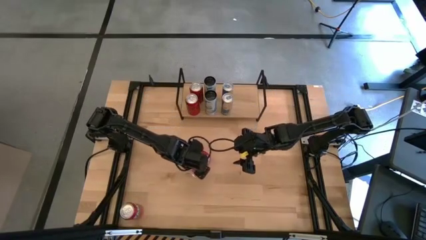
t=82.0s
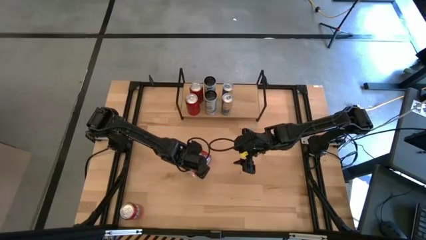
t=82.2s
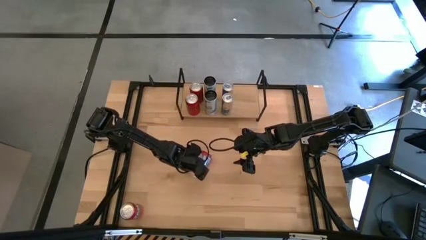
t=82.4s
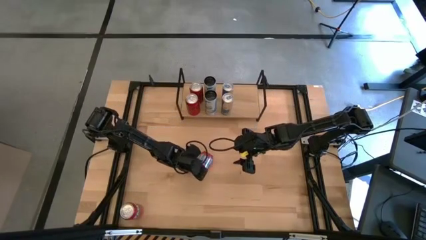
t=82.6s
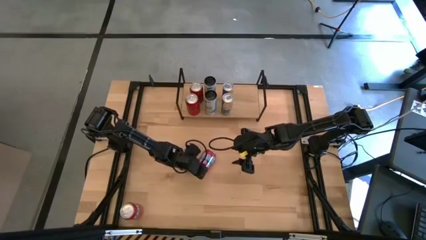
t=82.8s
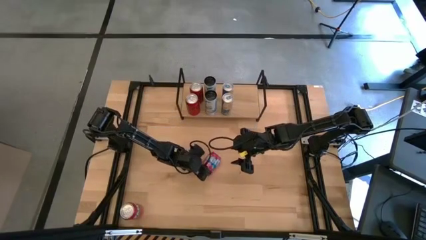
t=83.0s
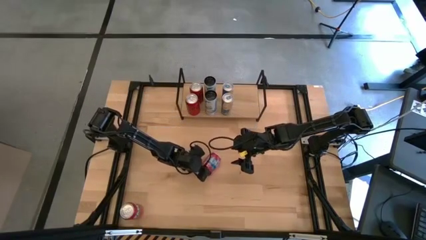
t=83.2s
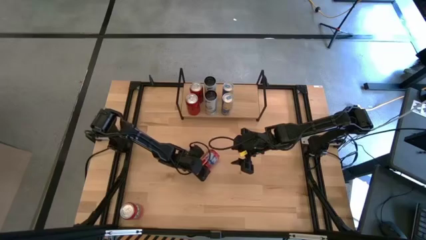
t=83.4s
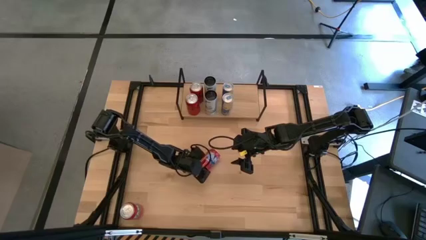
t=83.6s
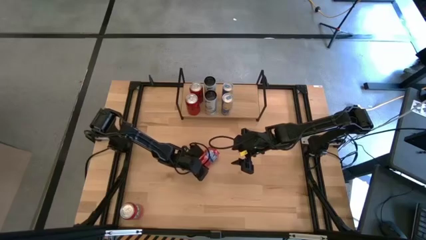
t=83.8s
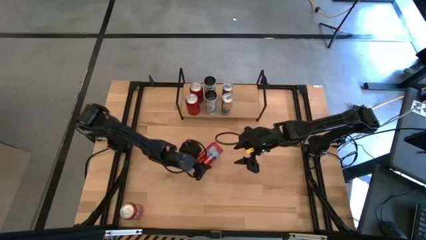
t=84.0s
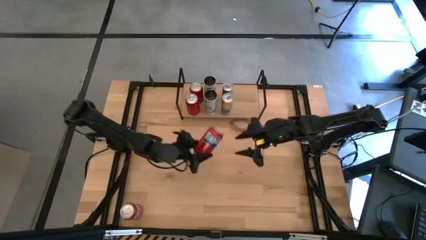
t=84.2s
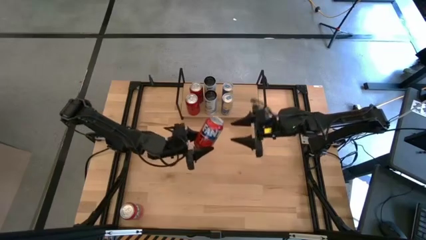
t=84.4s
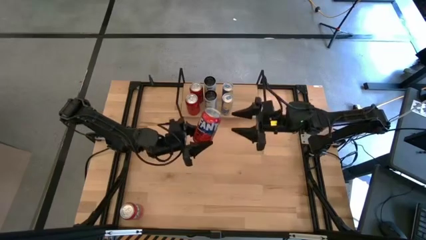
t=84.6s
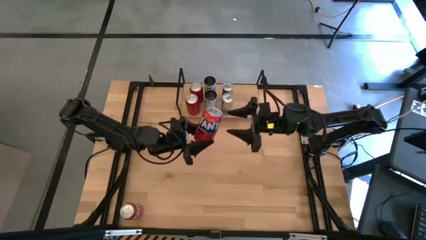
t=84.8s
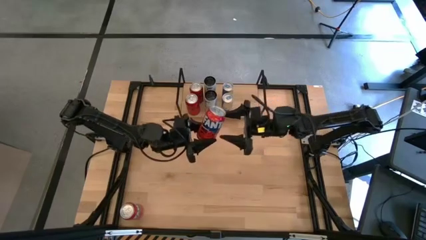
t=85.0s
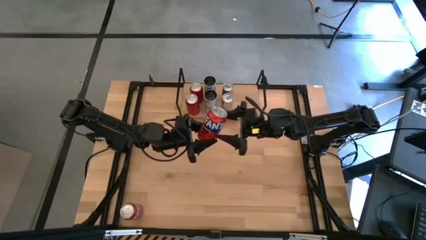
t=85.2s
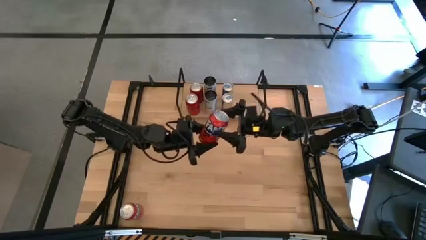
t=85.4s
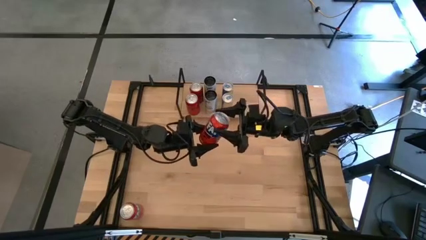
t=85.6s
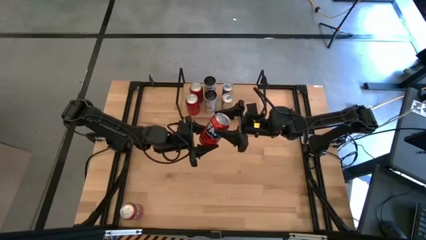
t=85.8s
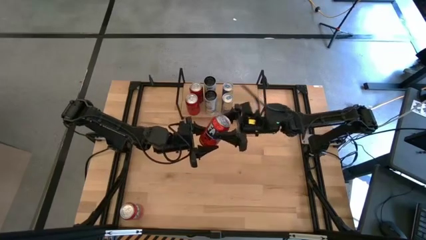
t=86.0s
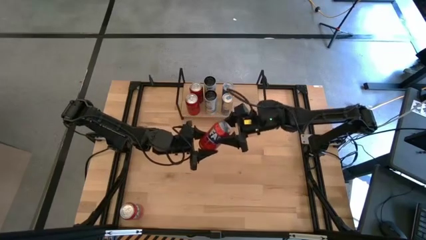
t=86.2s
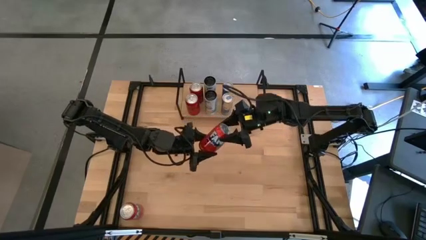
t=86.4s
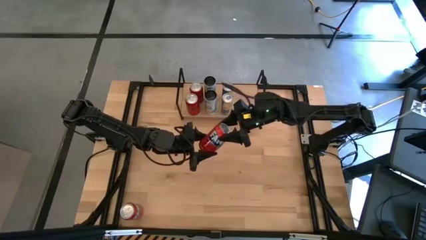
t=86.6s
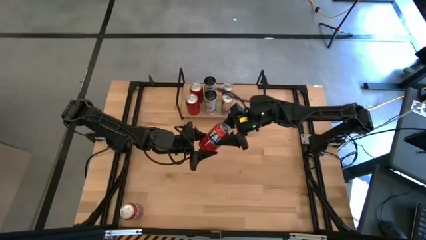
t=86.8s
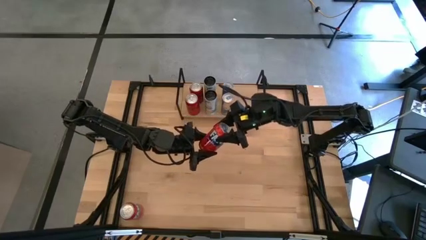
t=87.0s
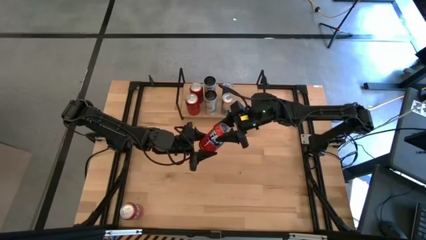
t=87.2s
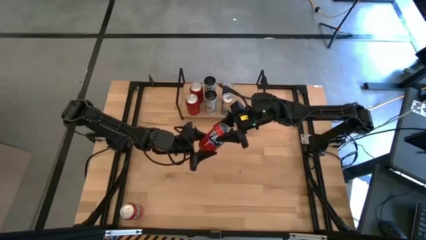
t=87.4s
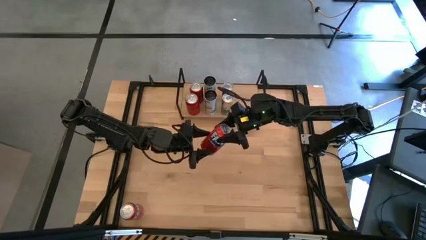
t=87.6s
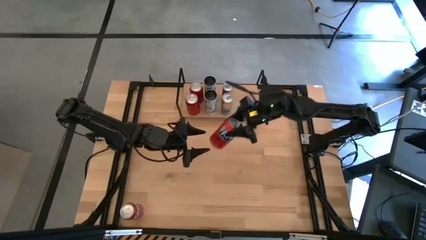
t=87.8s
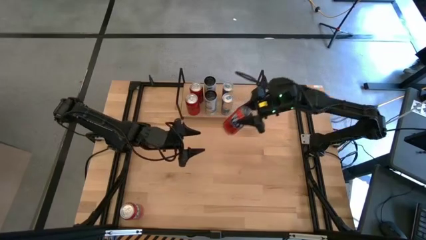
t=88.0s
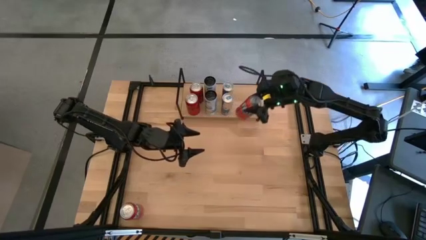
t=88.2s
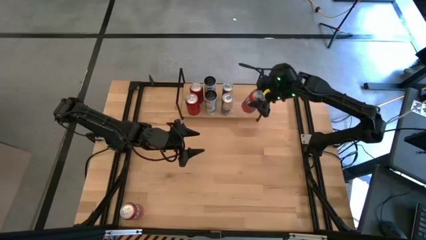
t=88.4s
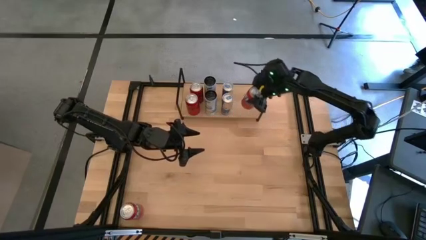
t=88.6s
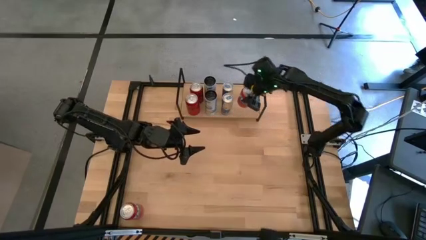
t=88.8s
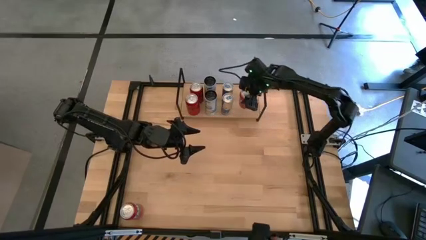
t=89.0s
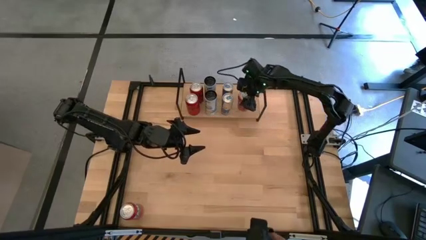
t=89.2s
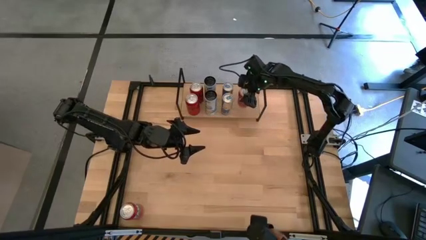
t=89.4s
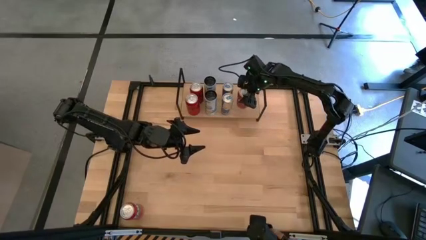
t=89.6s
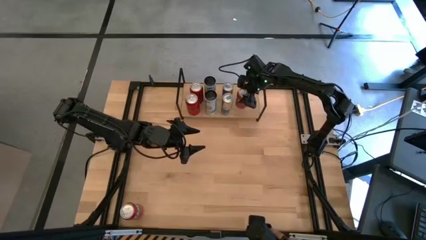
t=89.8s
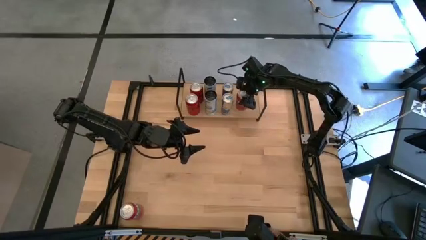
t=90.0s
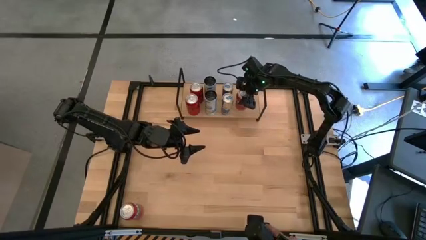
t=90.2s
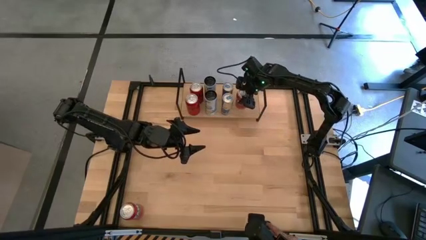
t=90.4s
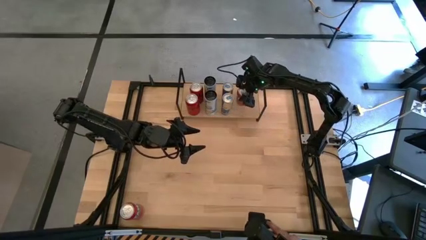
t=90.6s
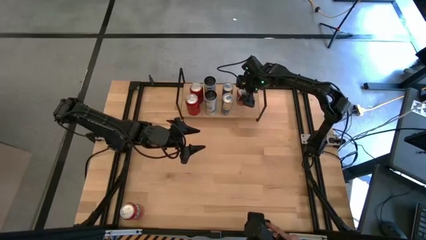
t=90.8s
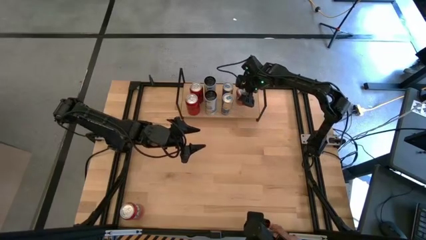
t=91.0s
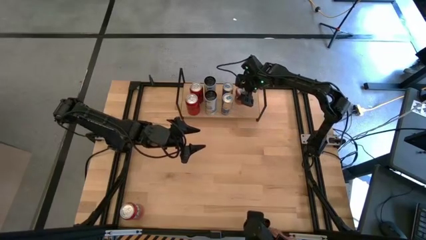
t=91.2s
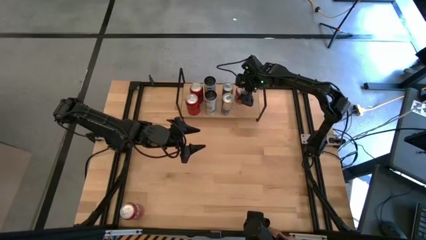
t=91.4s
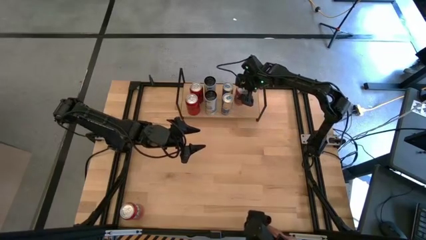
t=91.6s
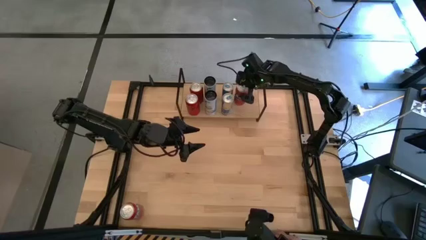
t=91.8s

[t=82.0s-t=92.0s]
Task: Place canned beverage on shelf
Put the top orange soda can on the shelf

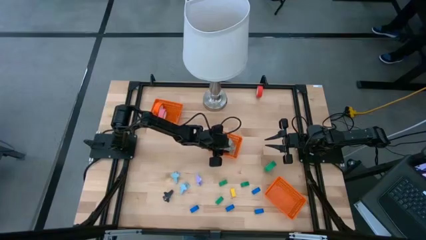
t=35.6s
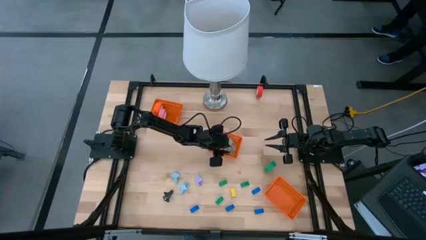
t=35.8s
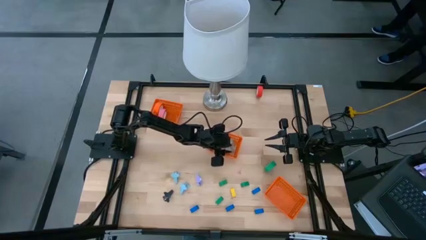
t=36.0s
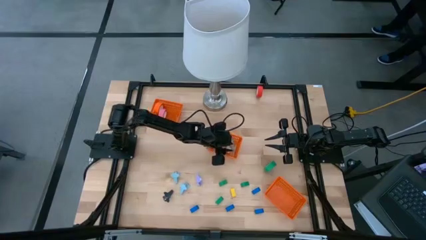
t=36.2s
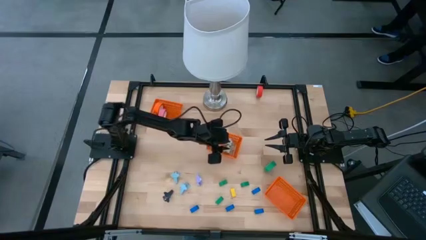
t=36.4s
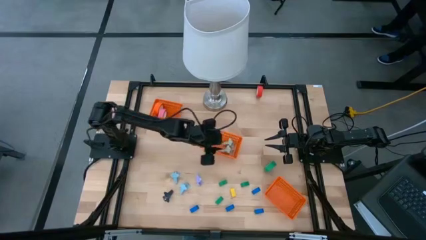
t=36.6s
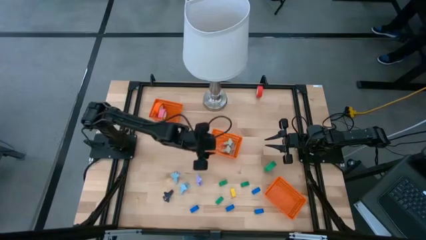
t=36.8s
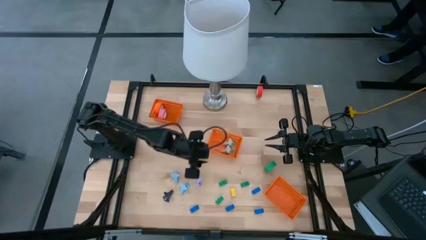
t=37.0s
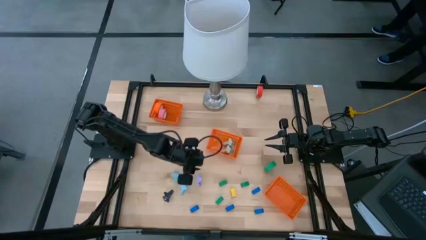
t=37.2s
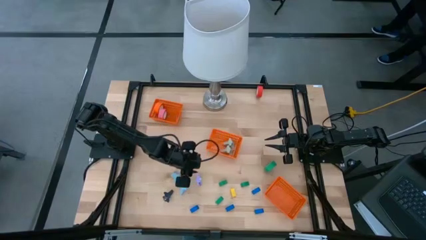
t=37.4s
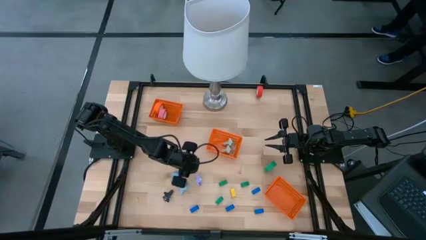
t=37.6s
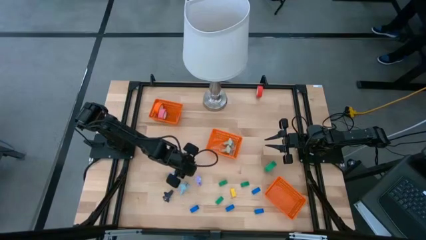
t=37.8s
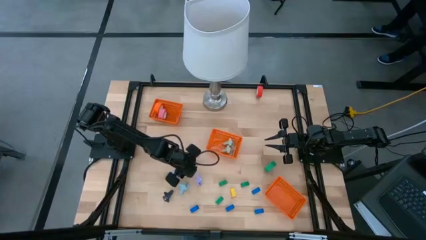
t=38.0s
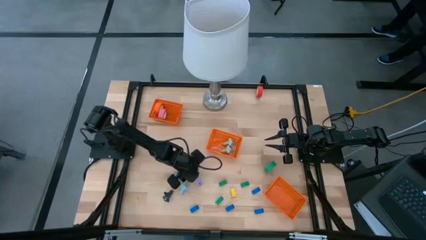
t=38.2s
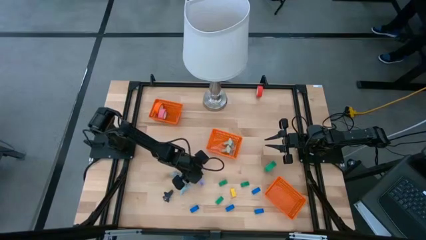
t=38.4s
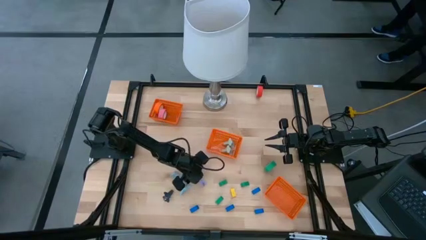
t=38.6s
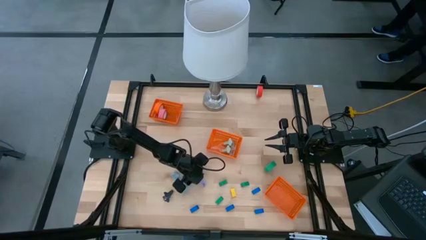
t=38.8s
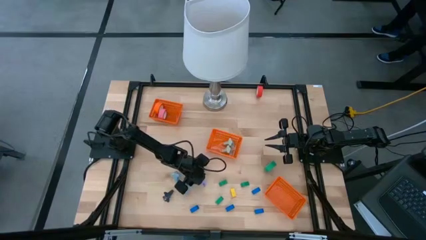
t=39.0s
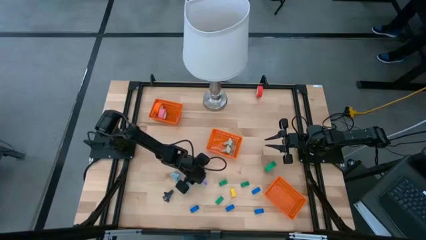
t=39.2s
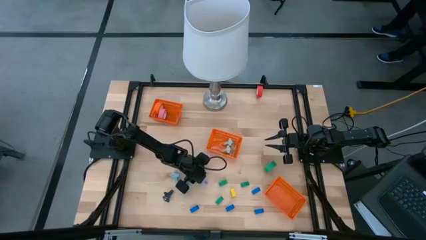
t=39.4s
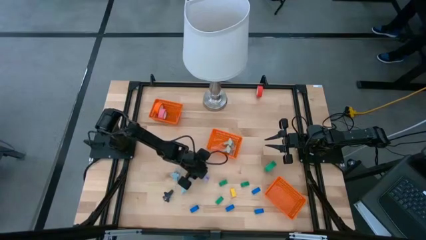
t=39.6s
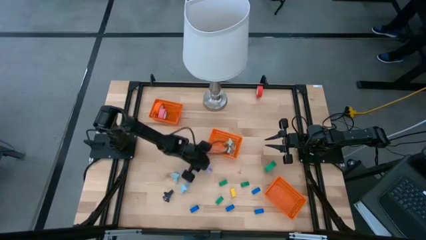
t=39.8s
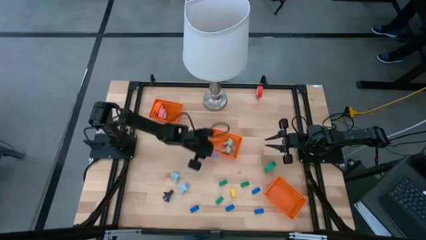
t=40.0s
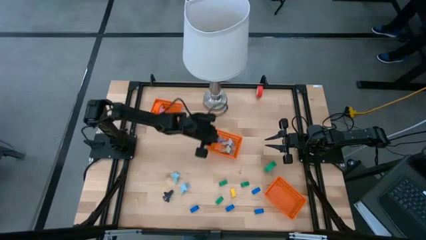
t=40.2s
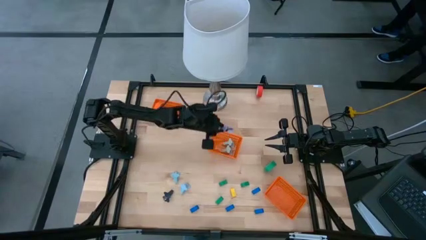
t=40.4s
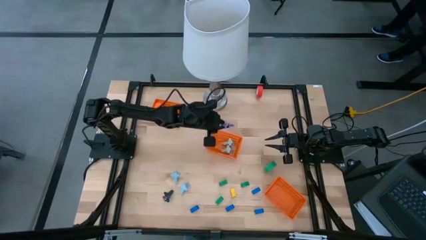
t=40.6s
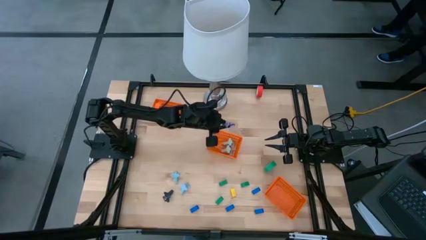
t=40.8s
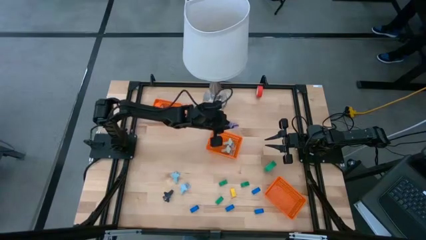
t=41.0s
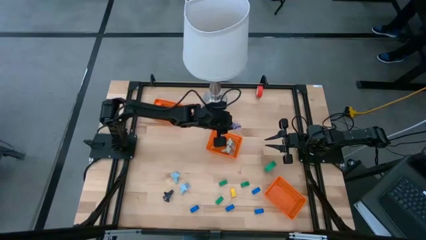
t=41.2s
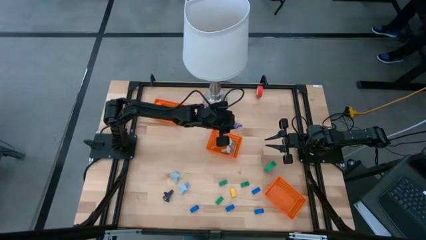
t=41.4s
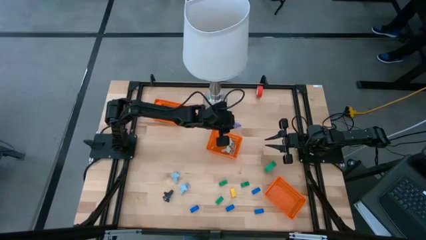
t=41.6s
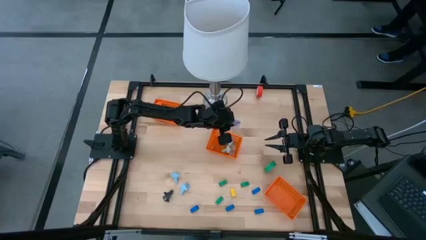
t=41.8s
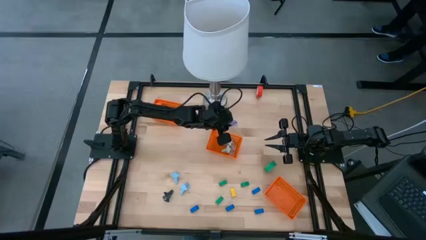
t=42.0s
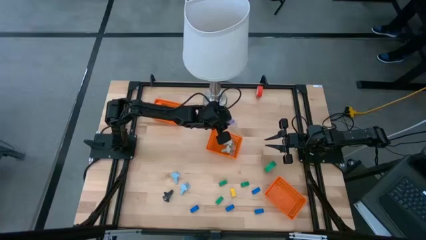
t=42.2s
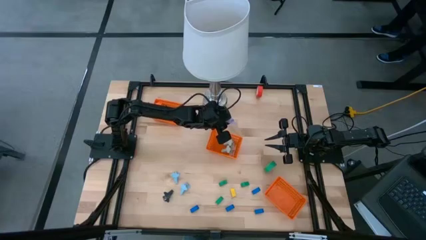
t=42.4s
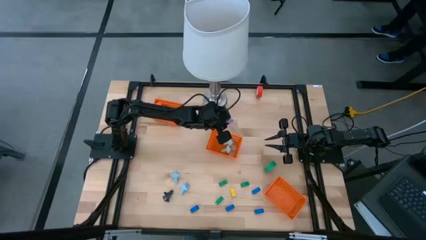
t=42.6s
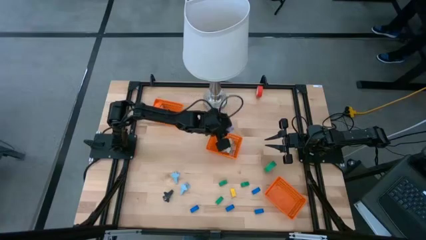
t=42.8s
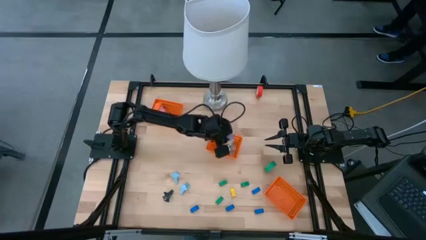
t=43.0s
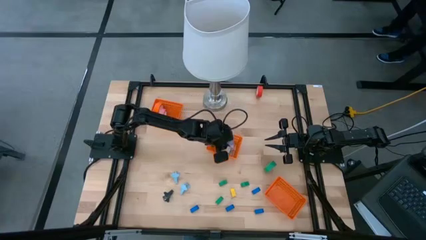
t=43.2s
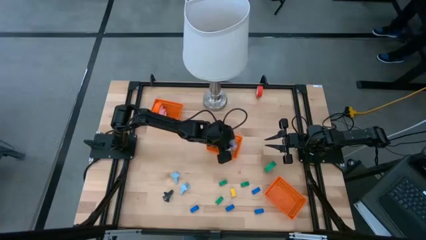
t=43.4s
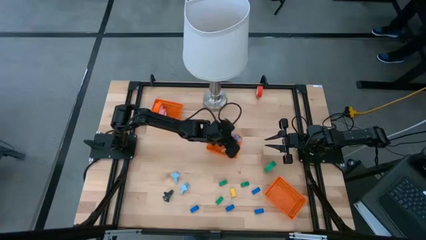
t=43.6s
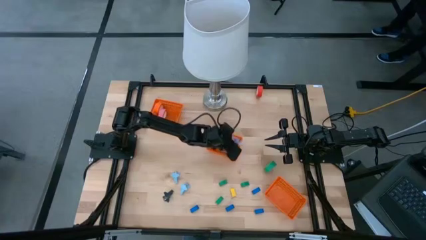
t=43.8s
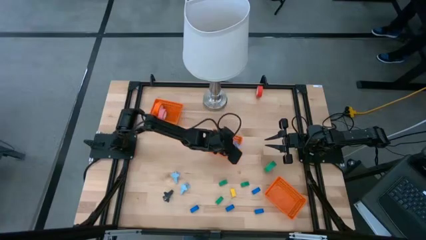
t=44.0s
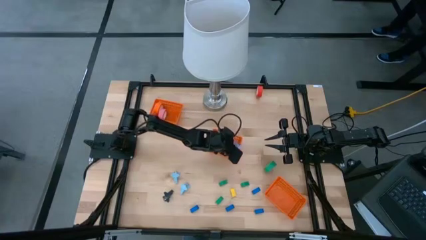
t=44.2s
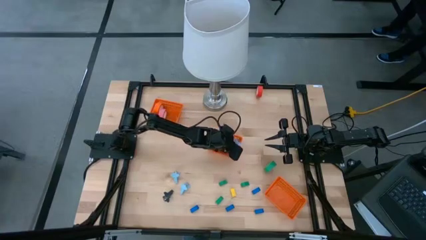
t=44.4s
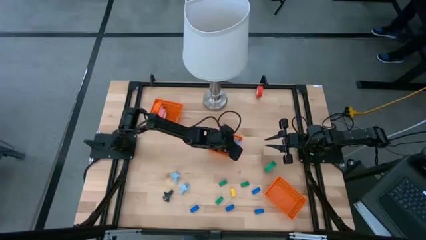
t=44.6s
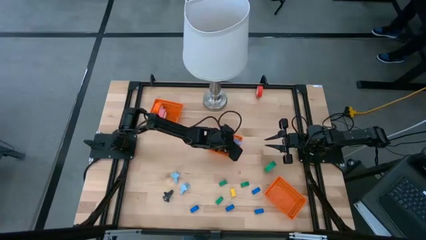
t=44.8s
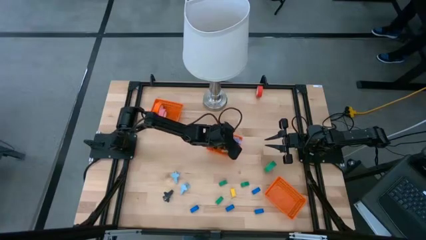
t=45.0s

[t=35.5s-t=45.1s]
Task: Pick and place Stapler, Stapler remover, tape
Put the purple staple remover into the middle orange bin
